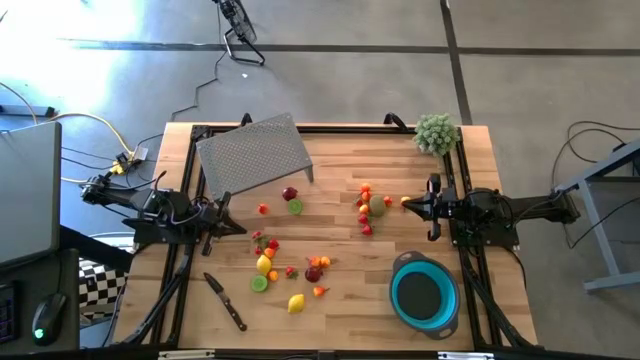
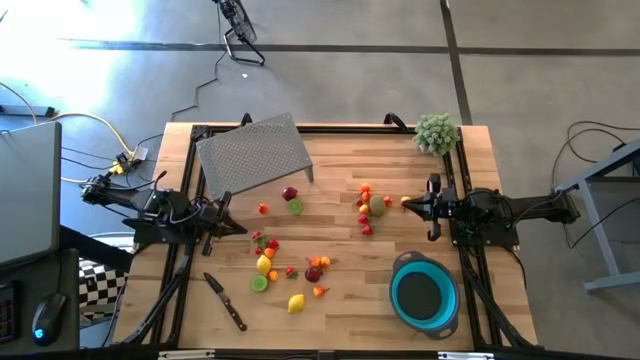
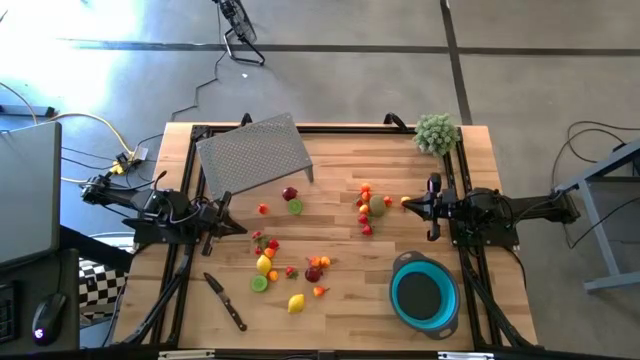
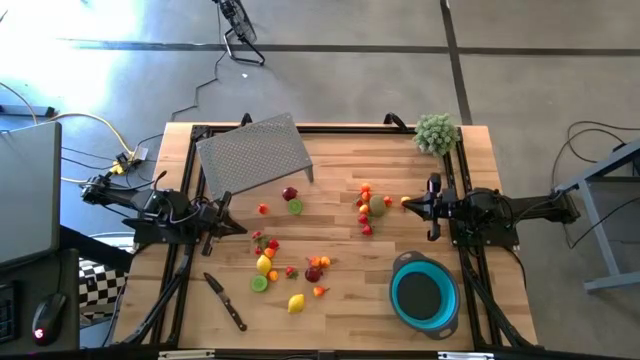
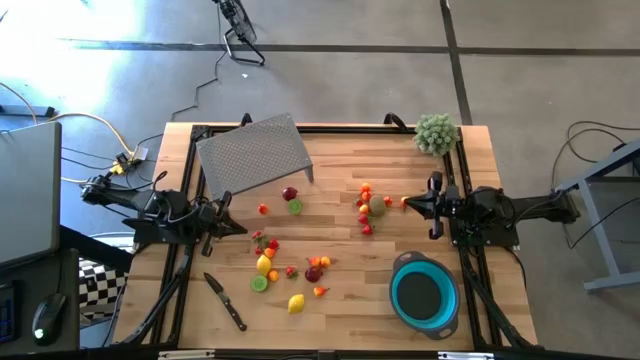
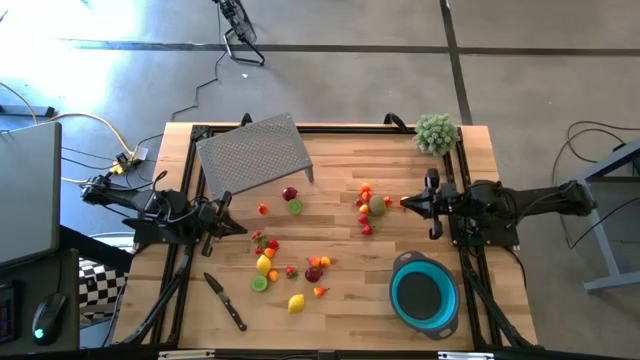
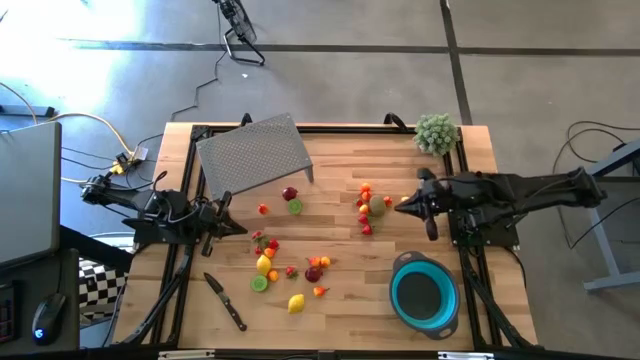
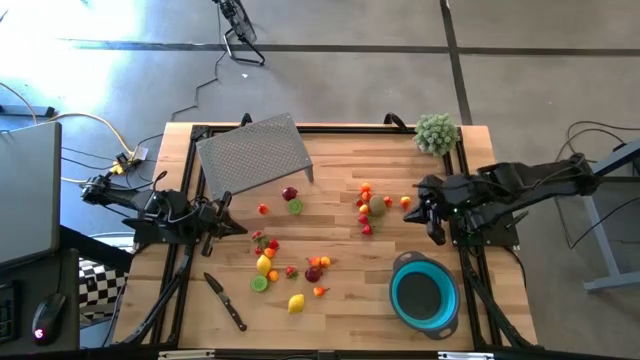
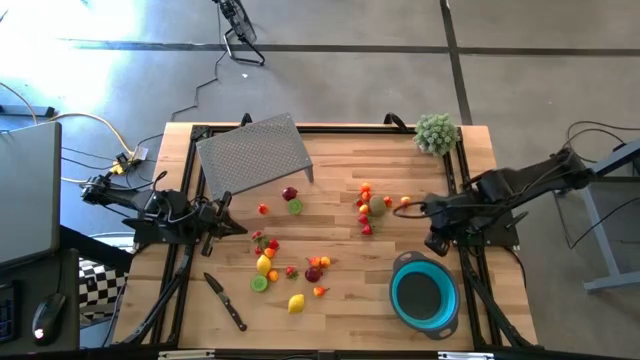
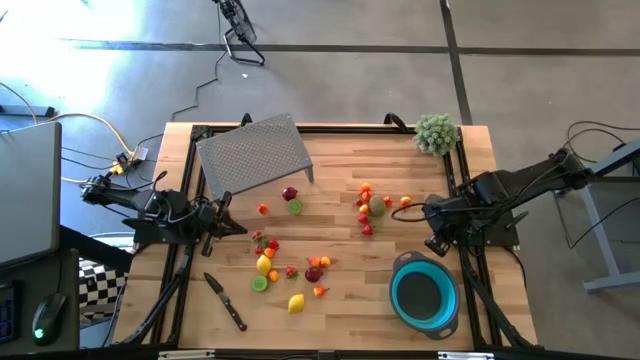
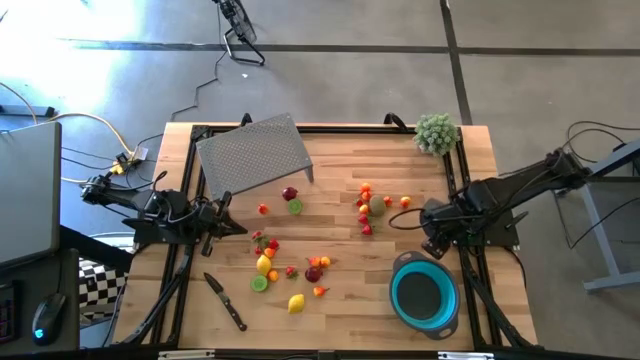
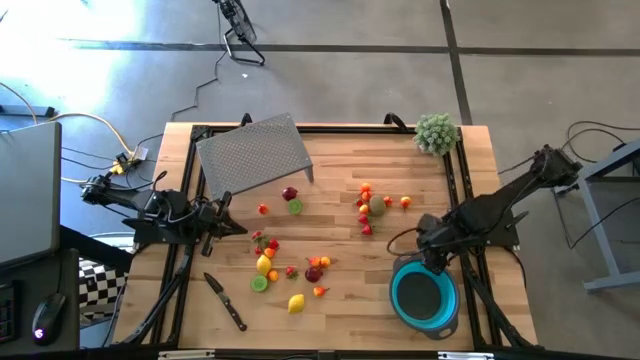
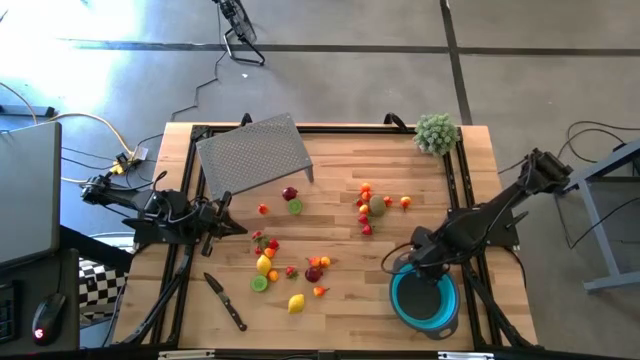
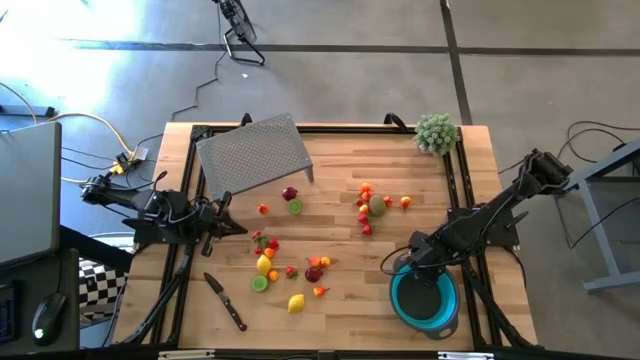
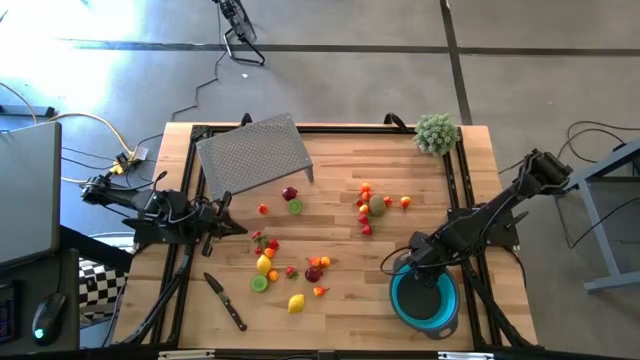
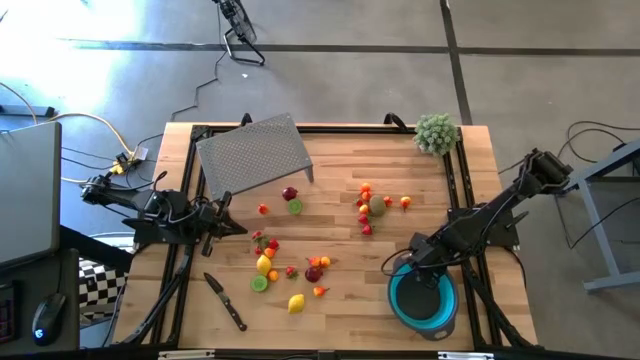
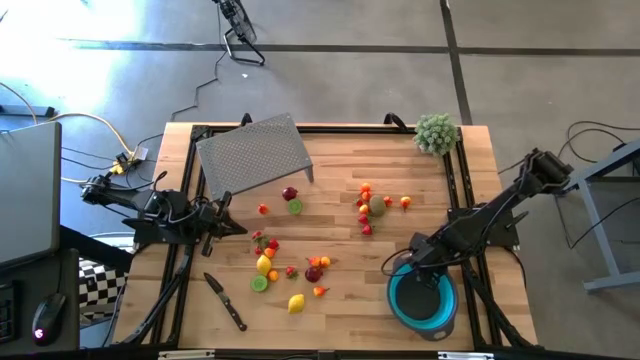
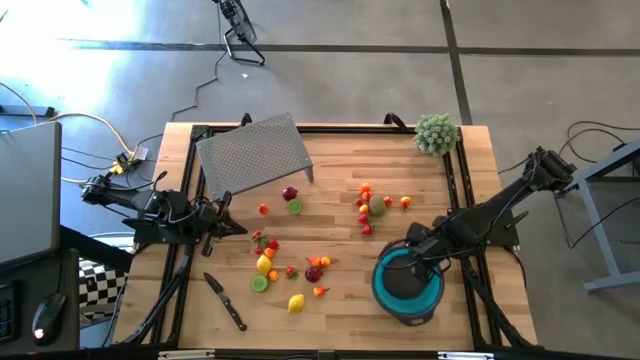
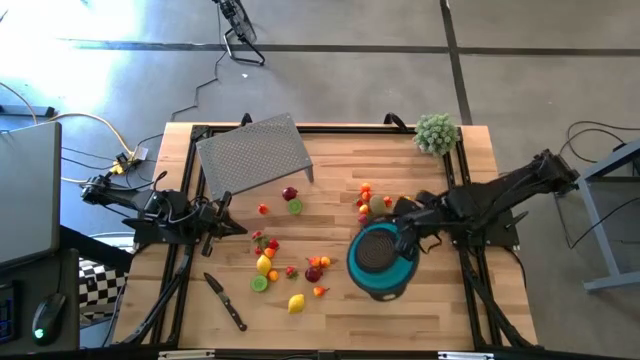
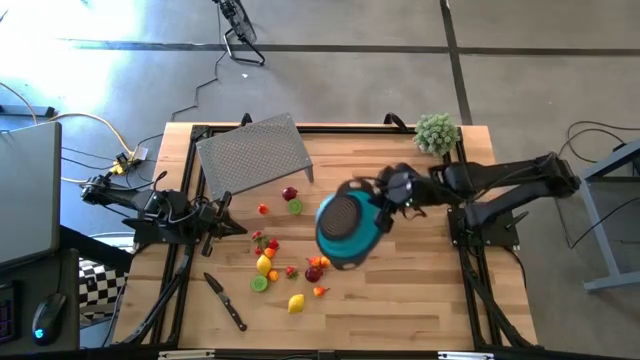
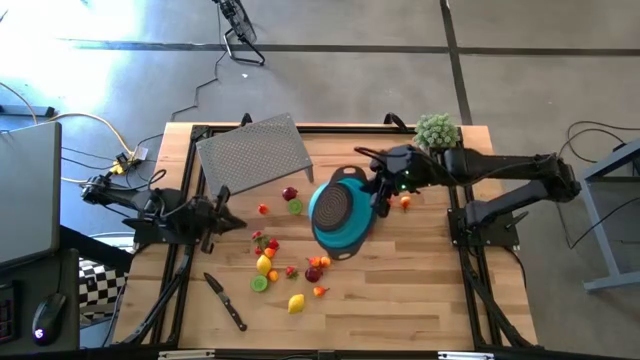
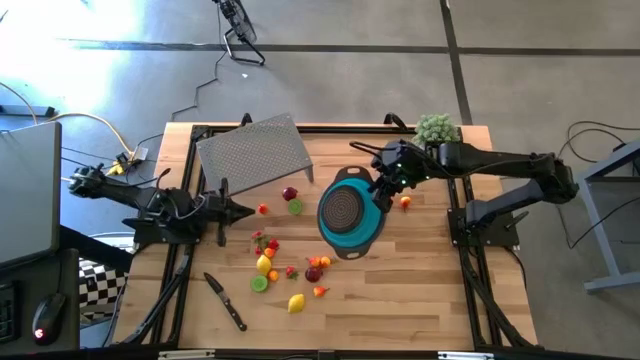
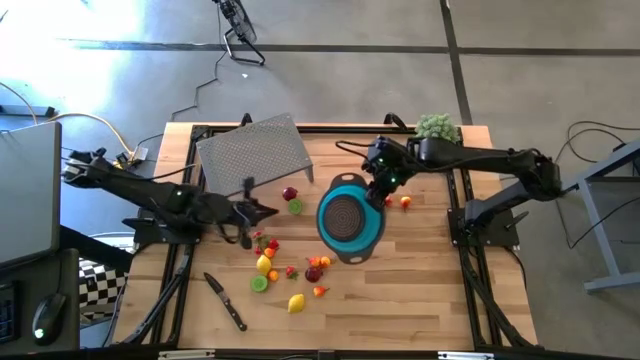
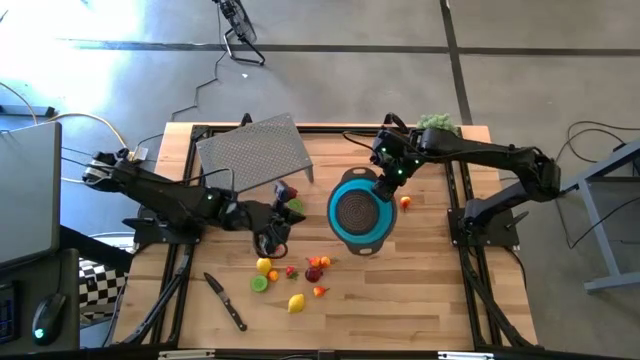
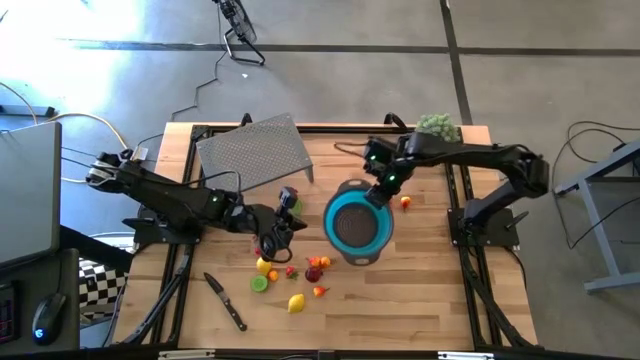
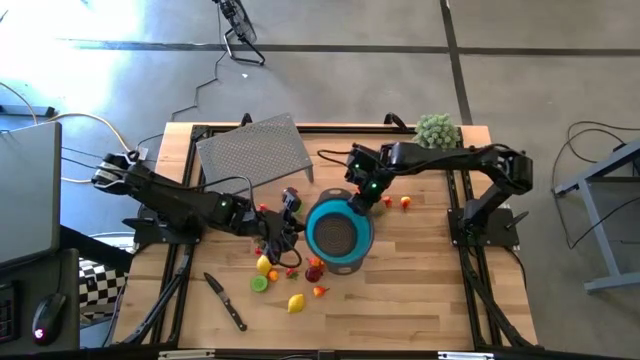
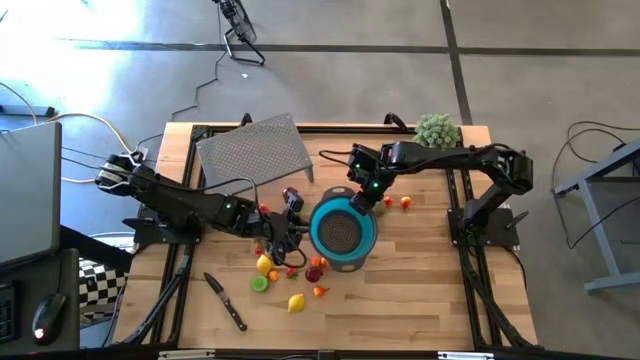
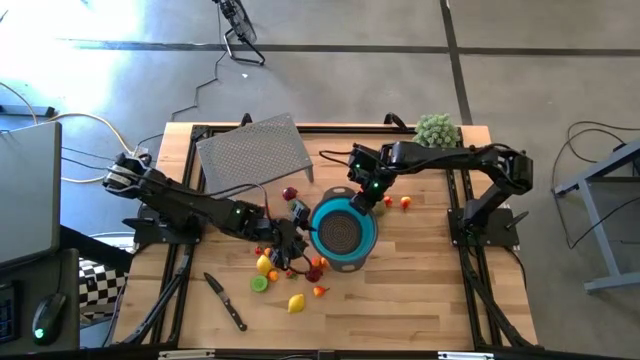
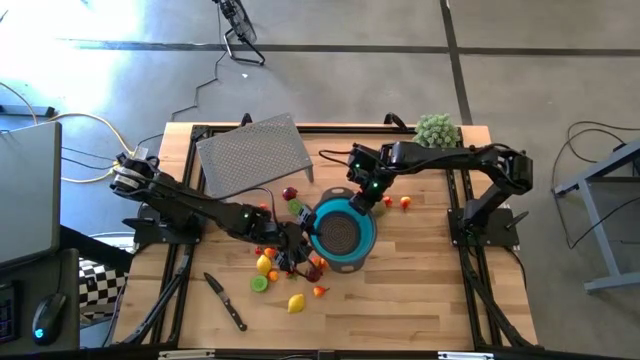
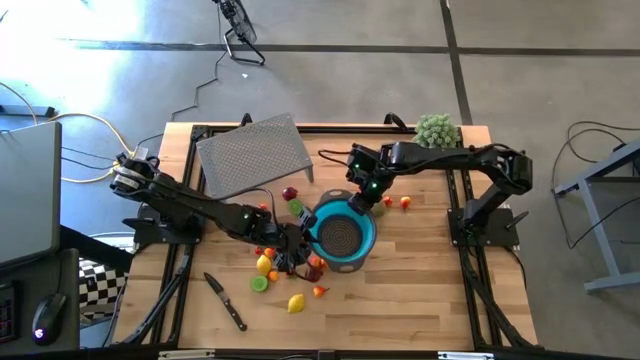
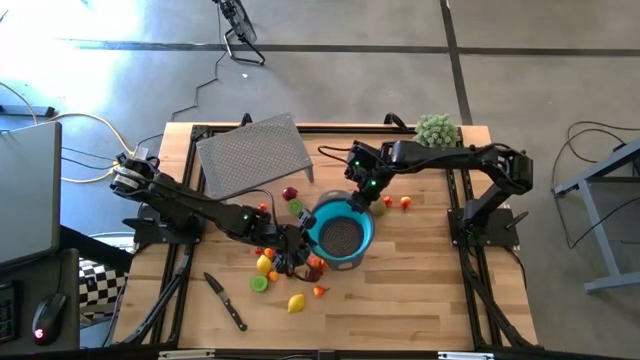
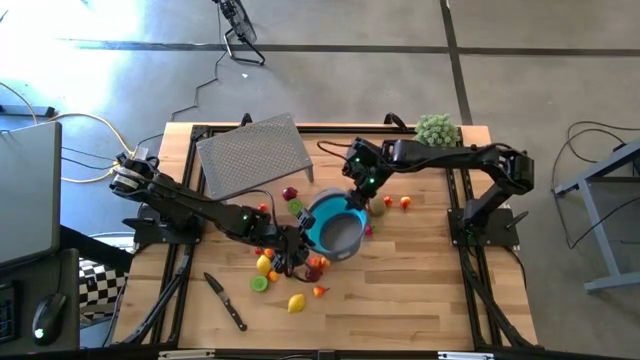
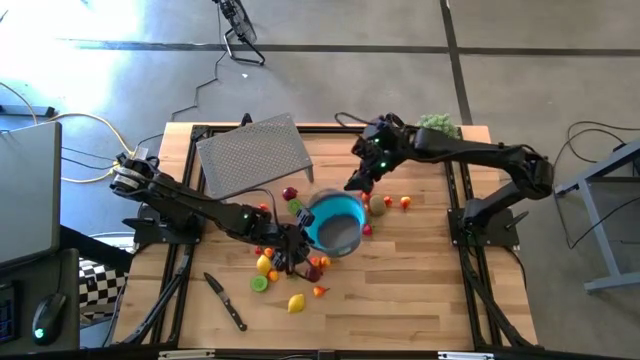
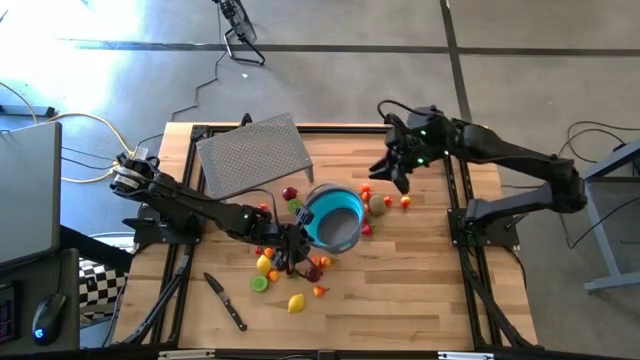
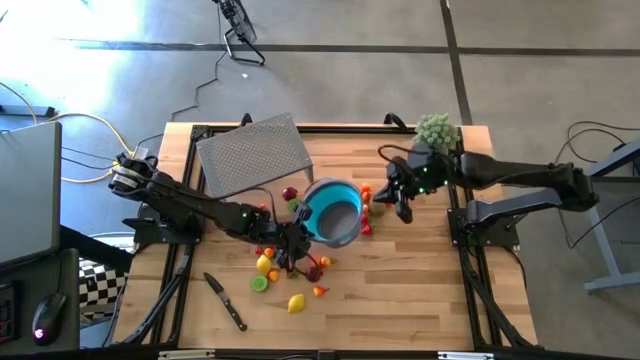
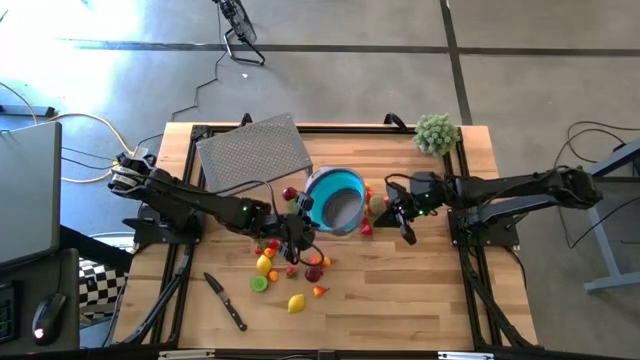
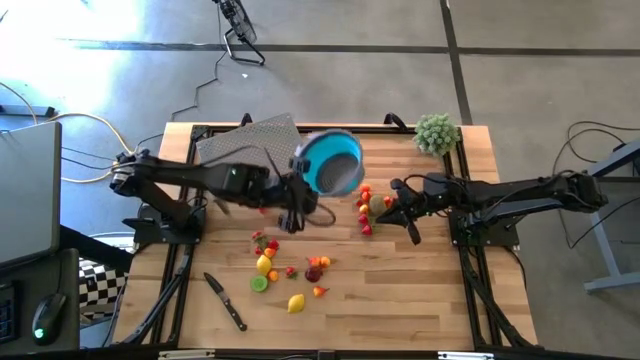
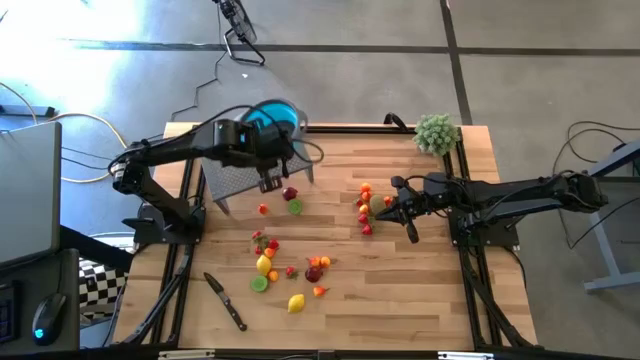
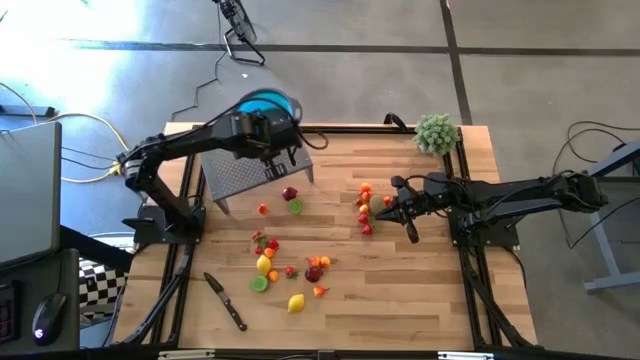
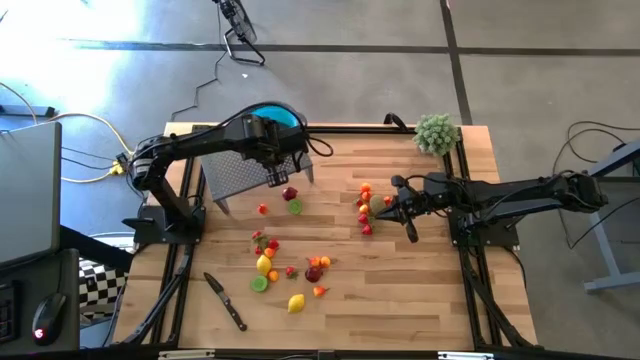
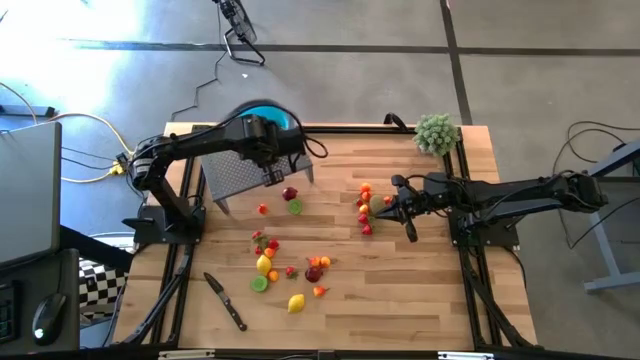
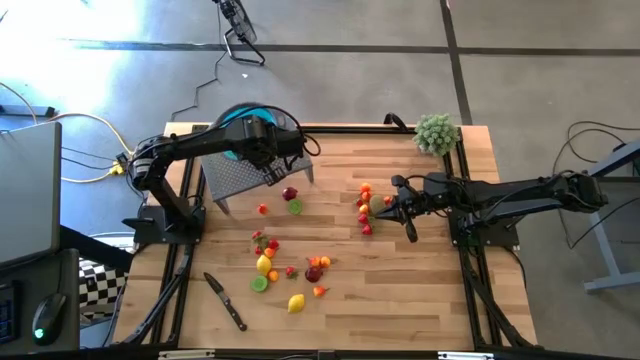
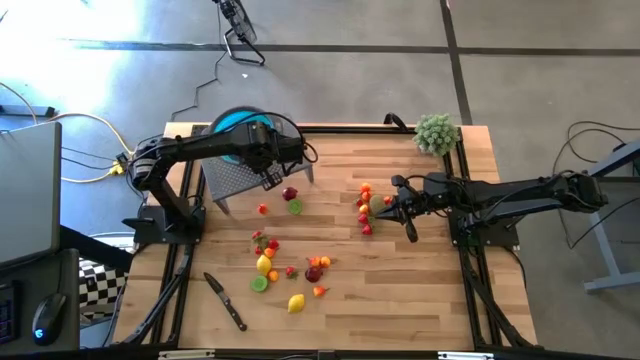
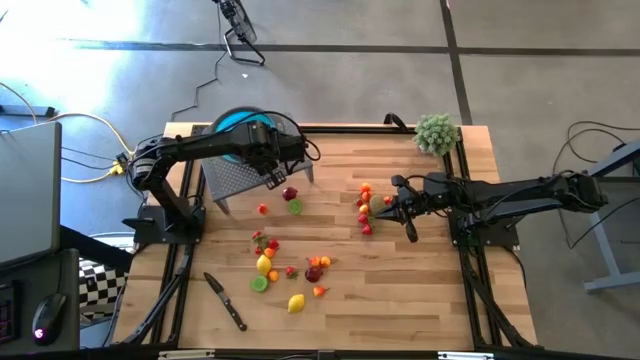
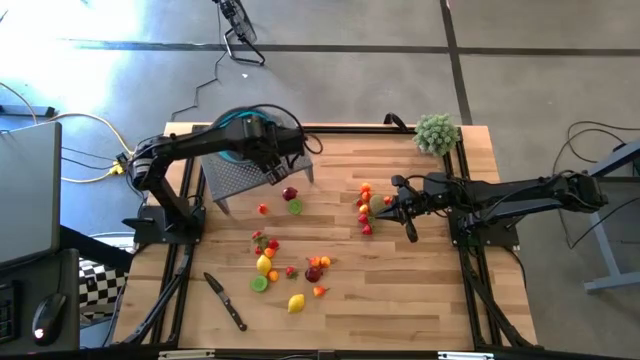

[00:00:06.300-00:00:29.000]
Task: Pick & Place Fruit
Put the blue strainer bowl on the shelf
